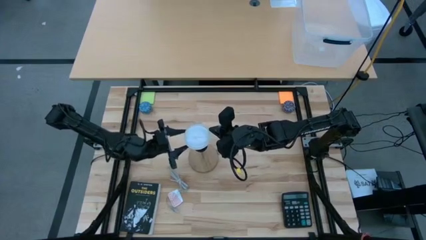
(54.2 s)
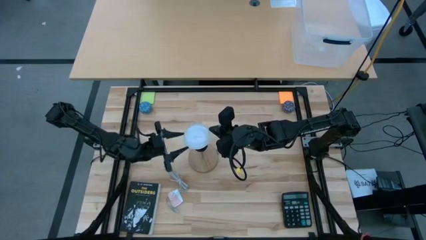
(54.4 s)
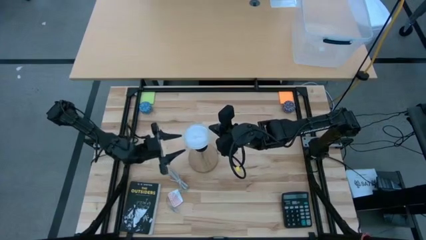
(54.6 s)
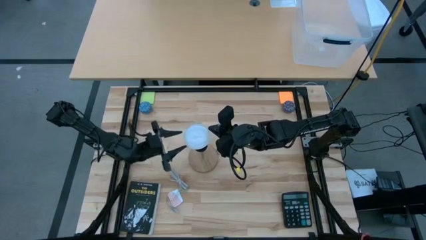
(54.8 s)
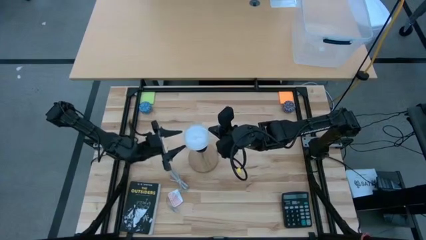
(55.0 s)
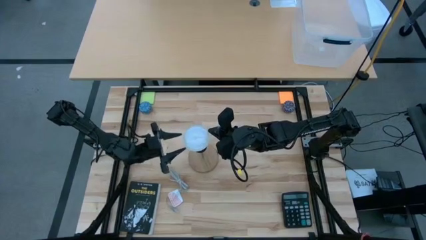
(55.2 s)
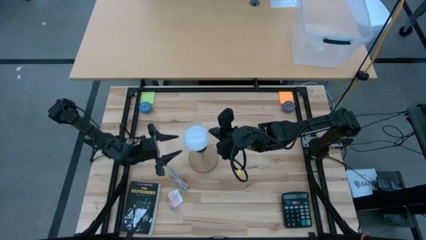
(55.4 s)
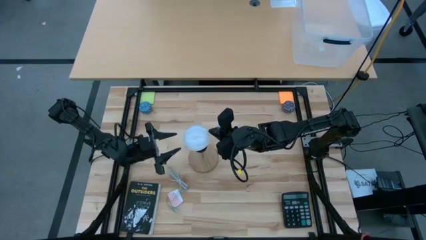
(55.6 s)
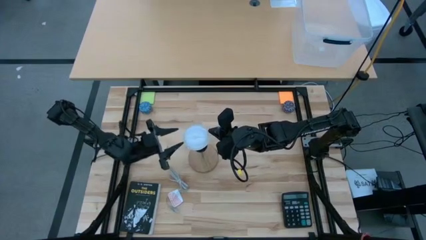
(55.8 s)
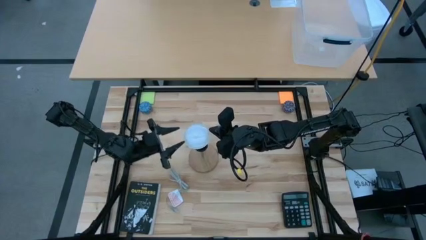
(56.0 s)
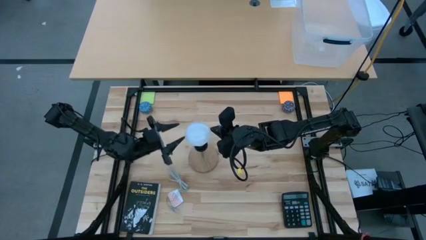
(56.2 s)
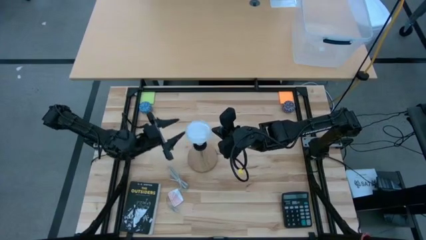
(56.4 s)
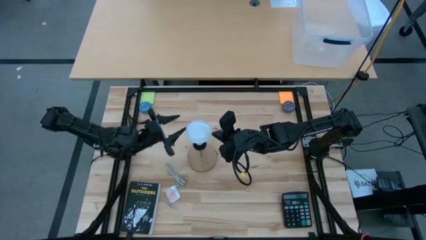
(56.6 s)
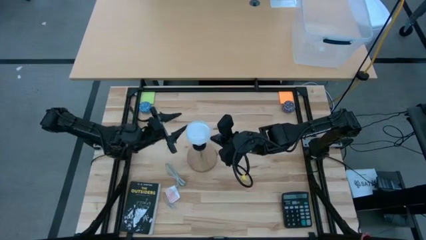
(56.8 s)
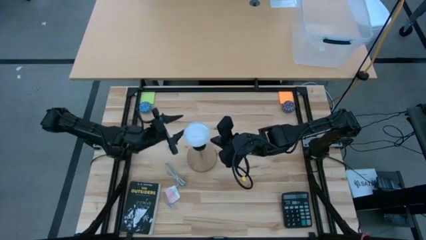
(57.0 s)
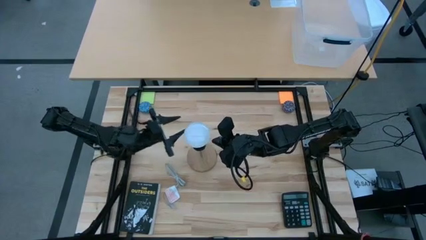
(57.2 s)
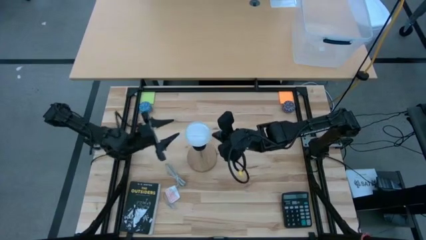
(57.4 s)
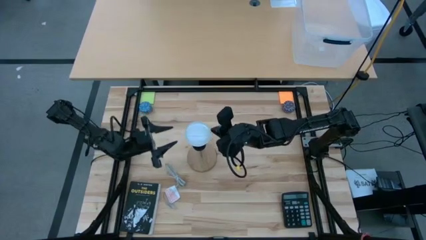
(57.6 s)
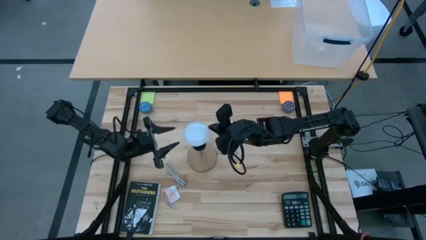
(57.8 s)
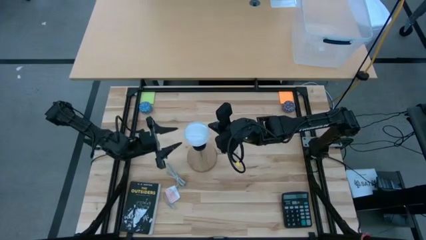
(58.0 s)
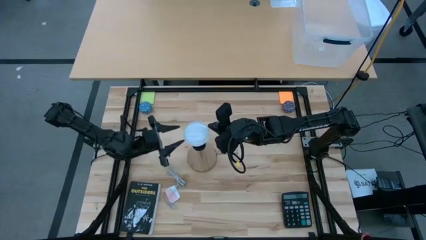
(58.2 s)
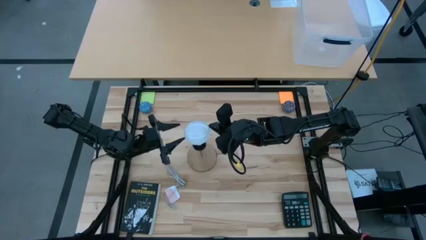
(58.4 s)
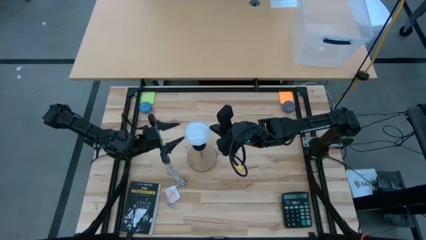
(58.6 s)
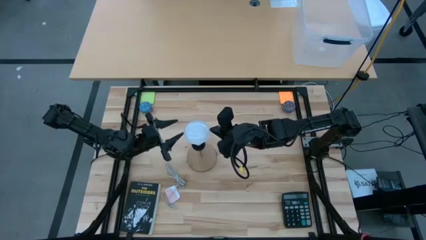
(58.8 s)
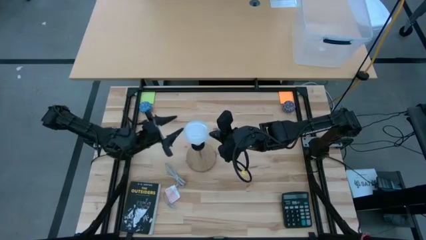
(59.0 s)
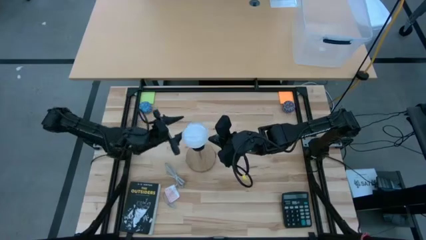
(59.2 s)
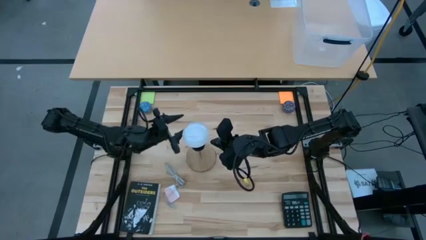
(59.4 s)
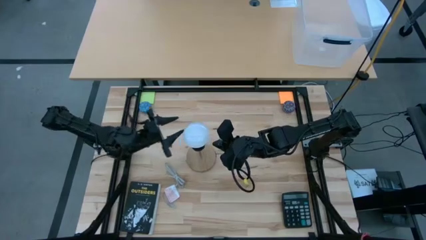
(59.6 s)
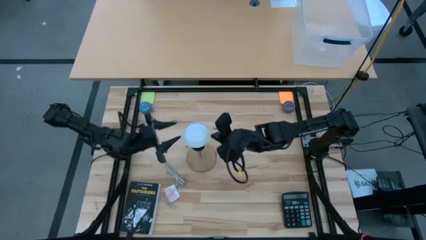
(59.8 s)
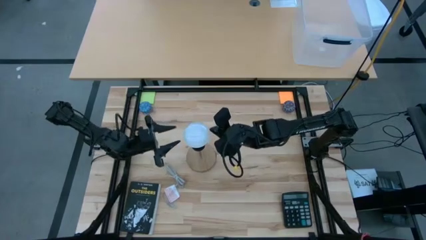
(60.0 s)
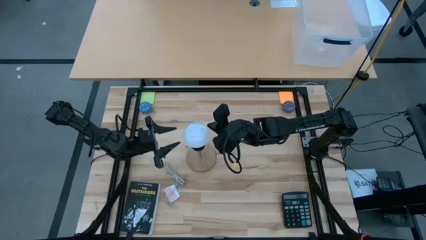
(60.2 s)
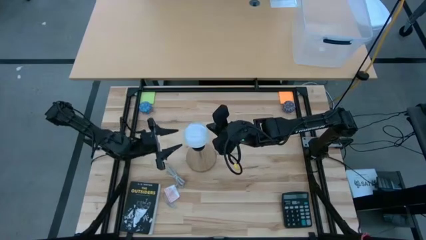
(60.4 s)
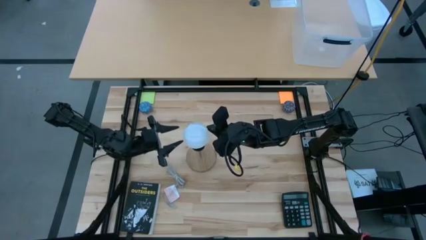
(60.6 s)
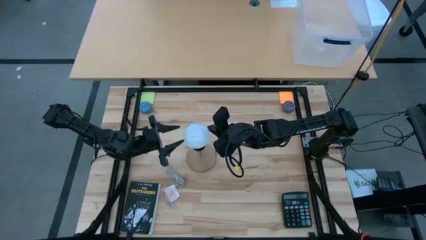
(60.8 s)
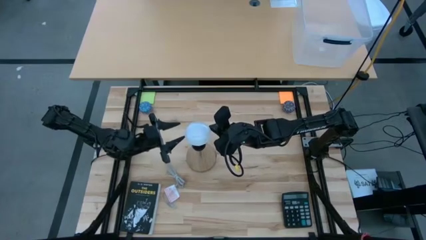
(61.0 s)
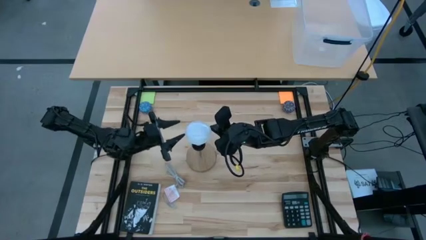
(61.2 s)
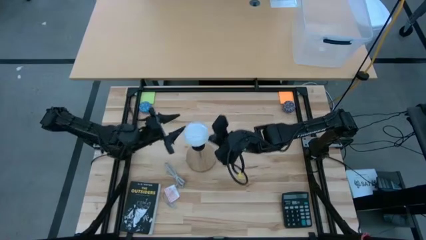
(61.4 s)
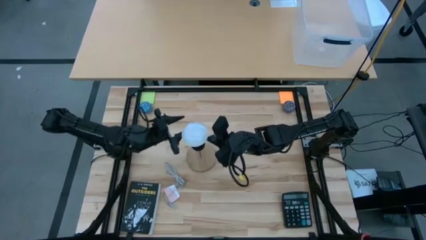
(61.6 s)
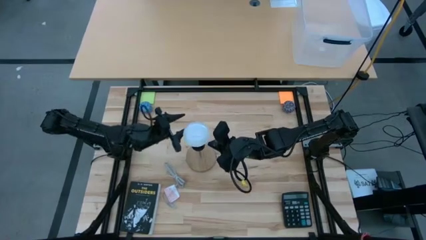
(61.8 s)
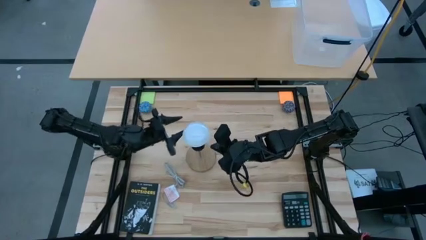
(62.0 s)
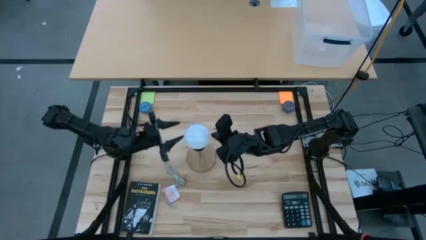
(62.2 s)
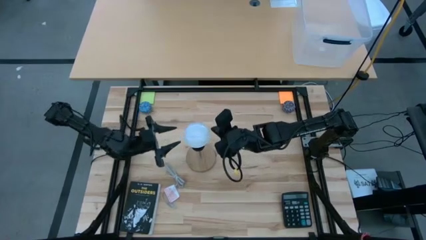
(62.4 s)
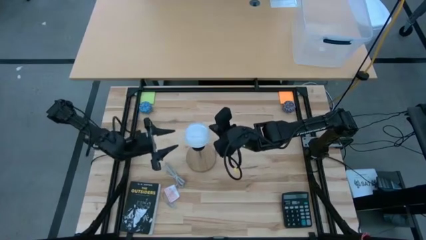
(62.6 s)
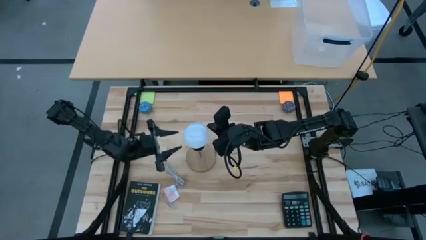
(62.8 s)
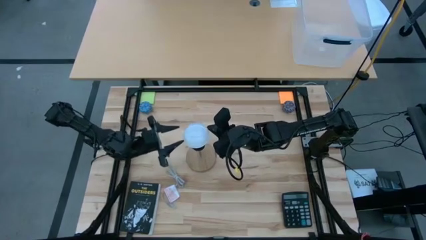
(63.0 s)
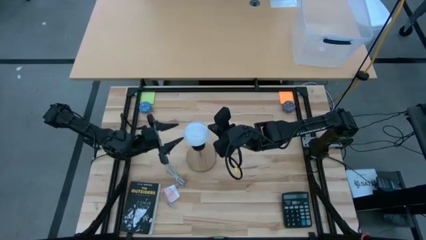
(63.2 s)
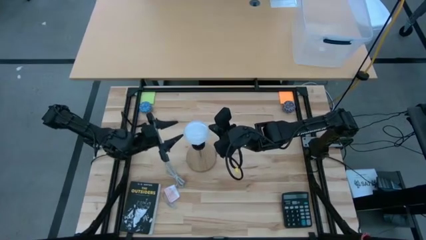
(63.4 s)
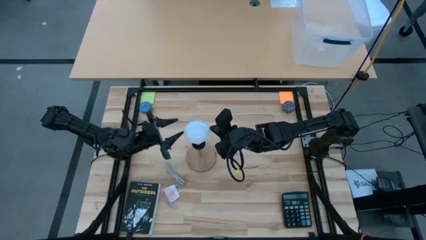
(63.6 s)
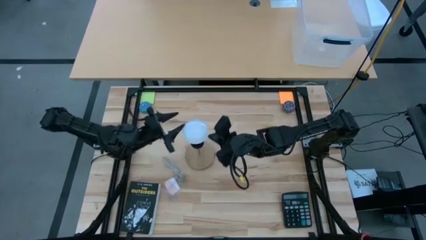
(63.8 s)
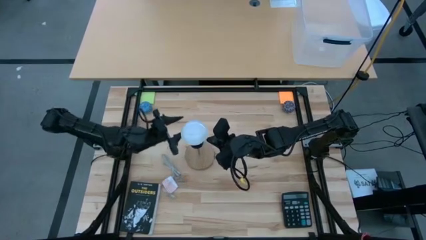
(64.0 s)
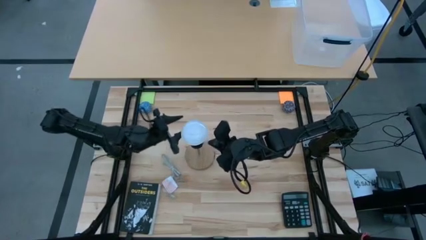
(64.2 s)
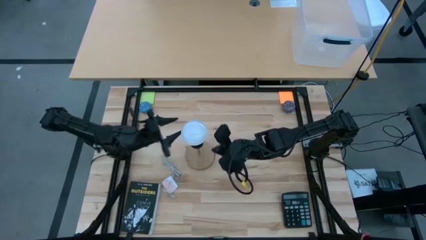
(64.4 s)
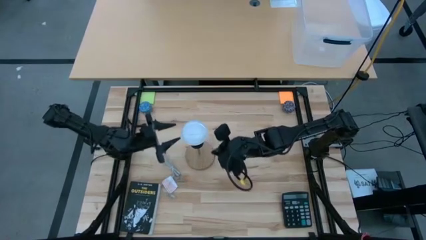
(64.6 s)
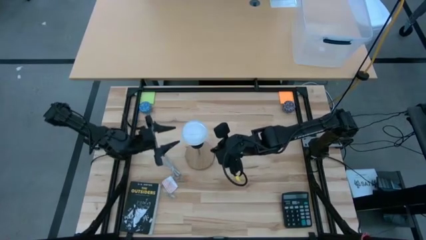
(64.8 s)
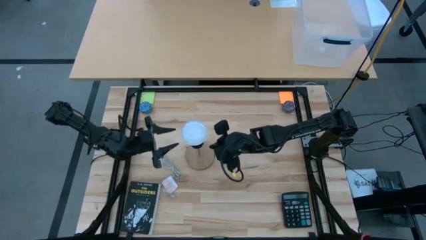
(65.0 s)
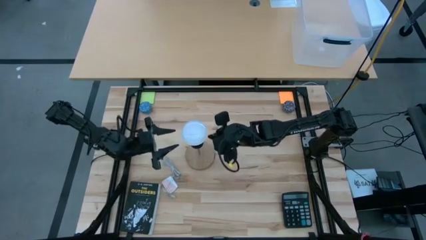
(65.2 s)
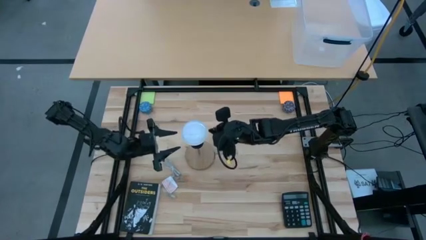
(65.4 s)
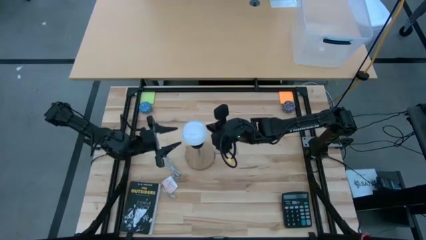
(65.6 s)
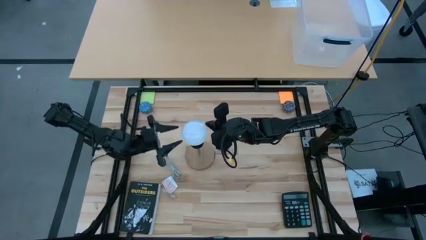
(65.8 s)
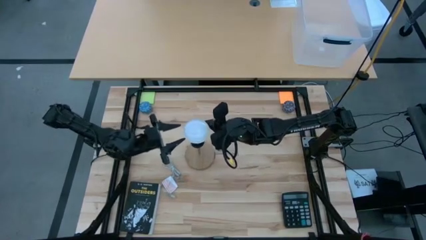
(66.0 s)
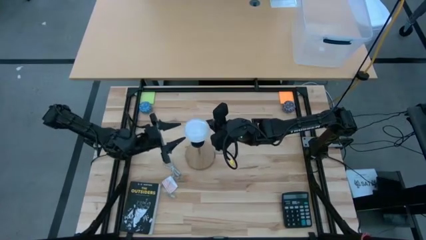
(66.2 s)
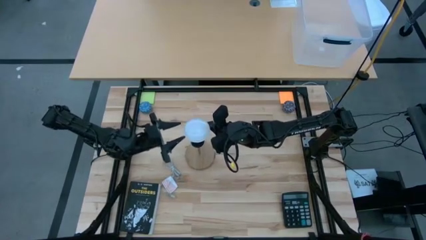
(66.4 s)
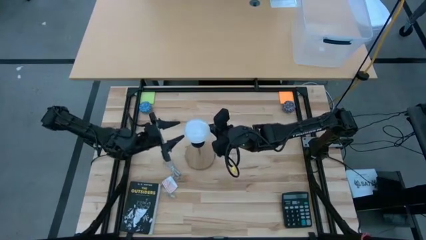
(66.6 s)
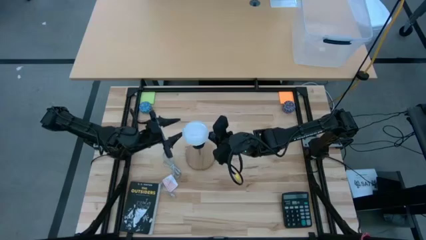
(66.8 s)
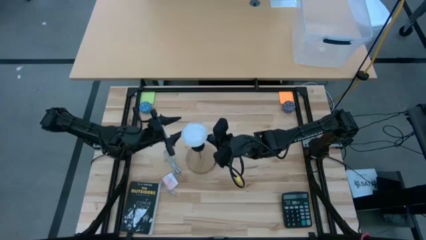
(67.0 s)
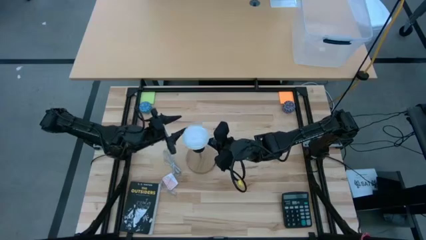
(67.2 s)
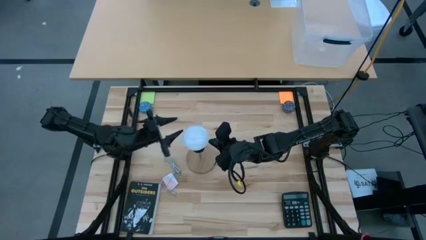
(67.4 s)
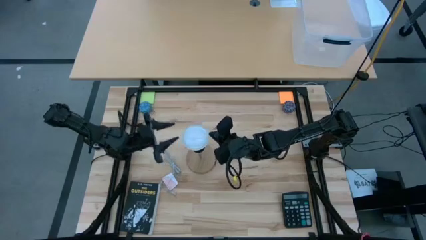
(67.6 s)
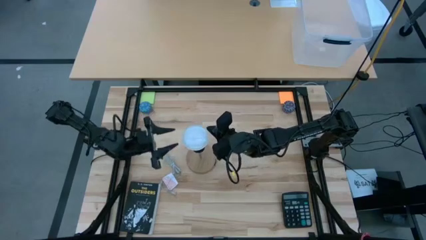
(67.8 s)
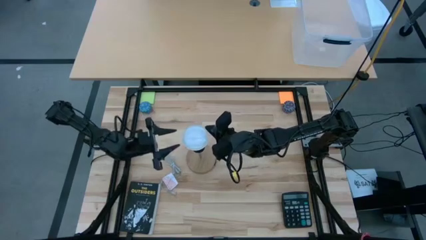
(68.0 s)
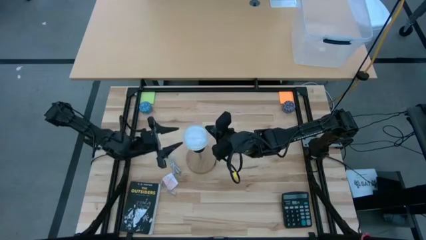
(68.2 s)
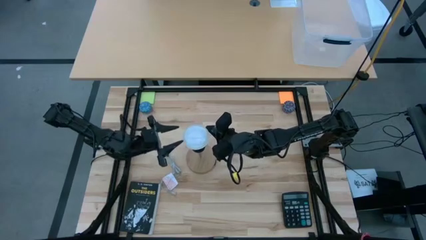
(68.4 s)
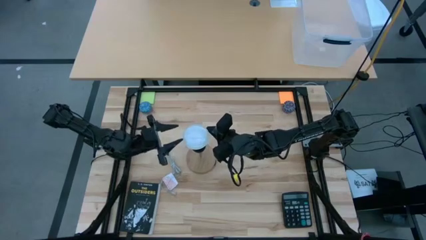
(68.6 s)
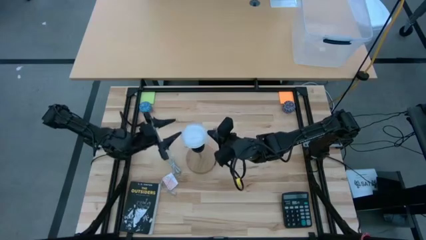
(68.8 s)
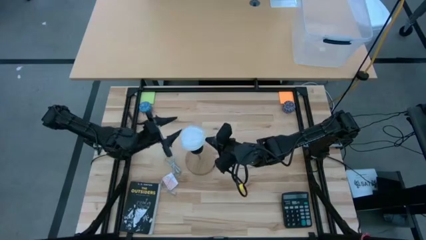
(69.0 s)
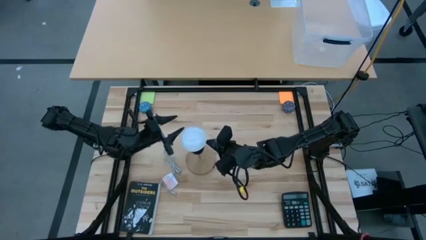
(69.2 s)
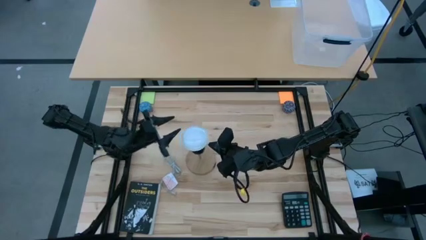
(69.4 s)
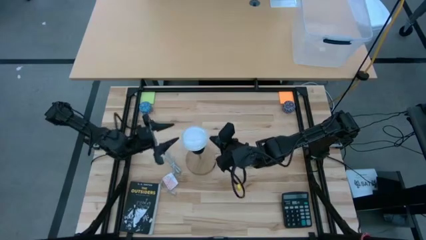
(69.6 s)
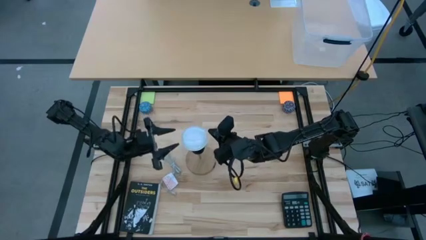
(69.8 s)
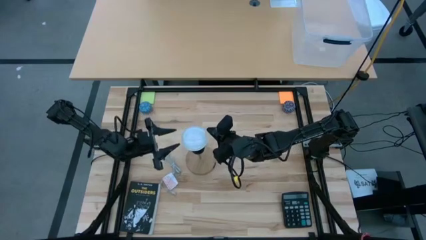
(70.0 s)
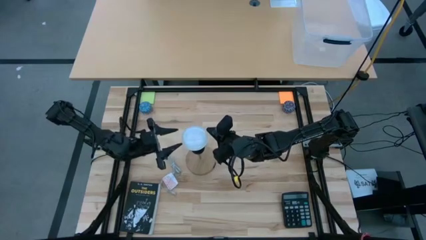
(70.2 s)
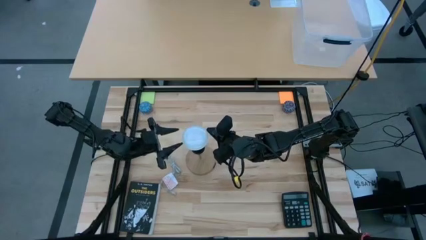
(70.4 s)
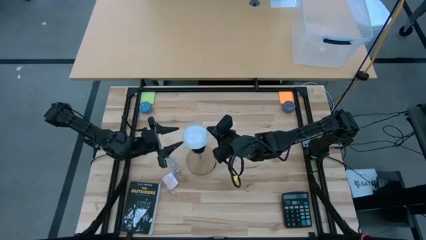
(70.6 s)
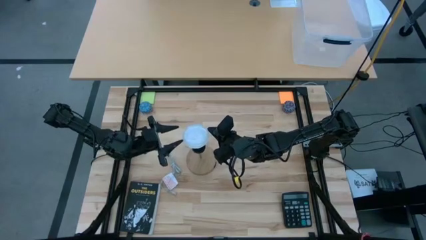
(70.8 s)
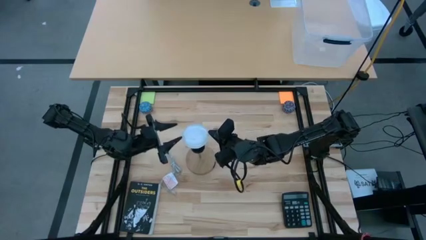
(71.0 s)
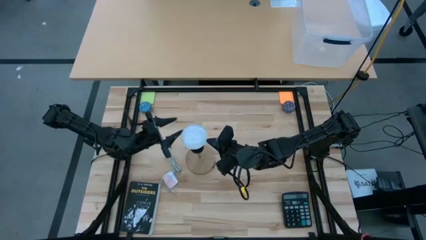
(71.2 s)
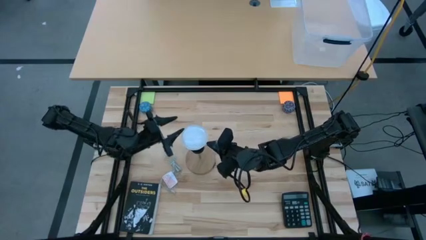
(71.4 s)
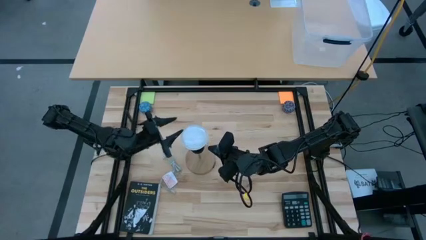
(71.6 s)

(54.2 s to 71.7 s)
Task: Screw lightbulb
Insert the lightbulb on the lamp
